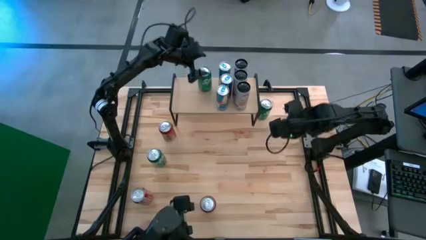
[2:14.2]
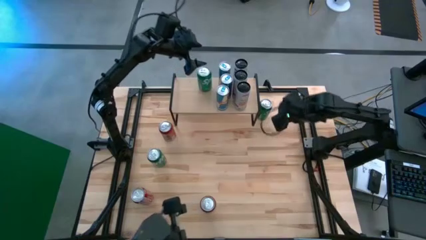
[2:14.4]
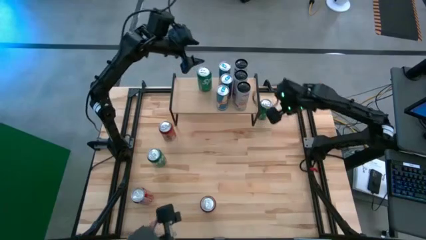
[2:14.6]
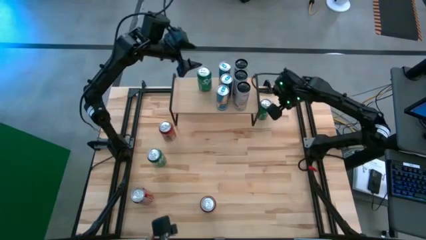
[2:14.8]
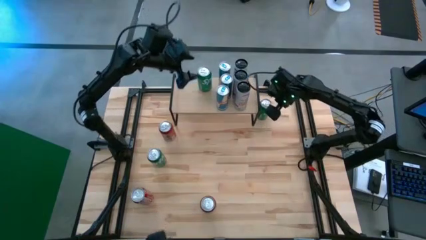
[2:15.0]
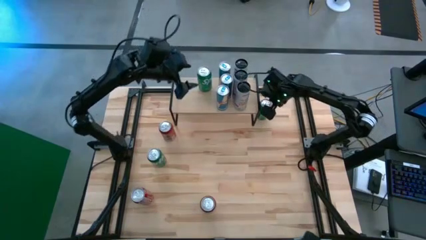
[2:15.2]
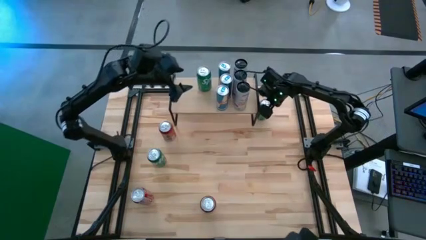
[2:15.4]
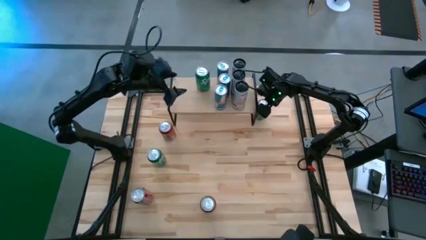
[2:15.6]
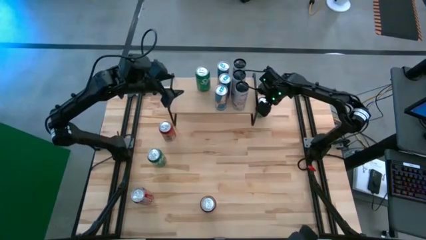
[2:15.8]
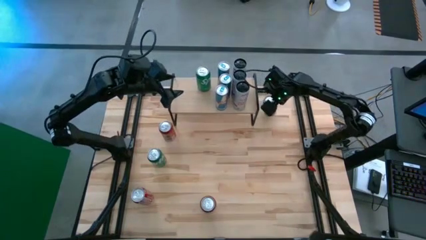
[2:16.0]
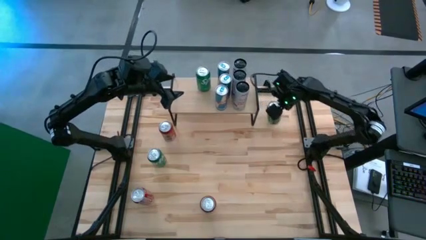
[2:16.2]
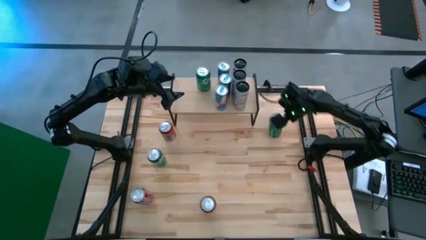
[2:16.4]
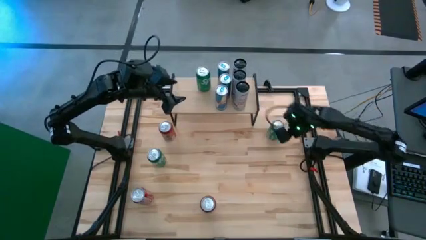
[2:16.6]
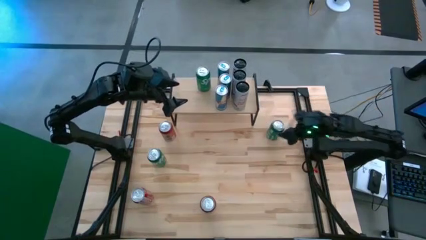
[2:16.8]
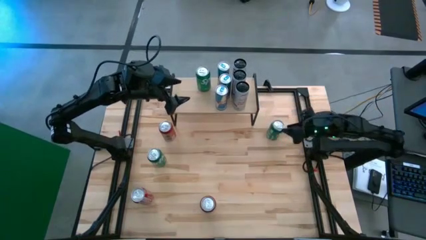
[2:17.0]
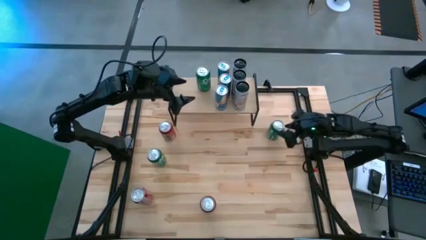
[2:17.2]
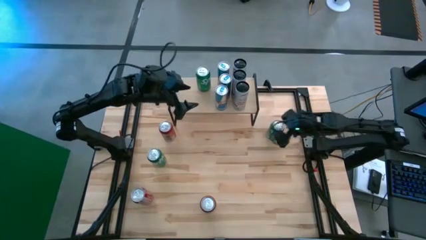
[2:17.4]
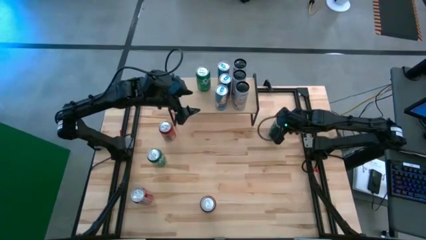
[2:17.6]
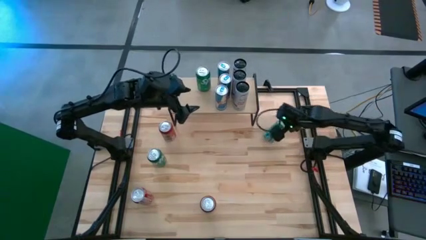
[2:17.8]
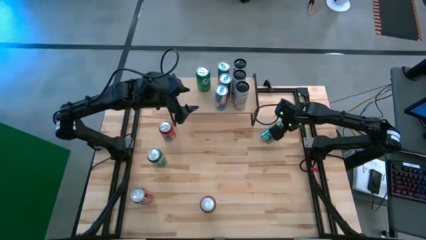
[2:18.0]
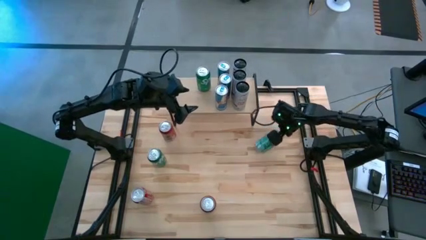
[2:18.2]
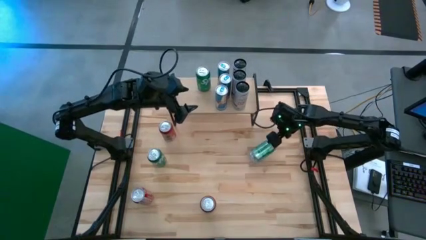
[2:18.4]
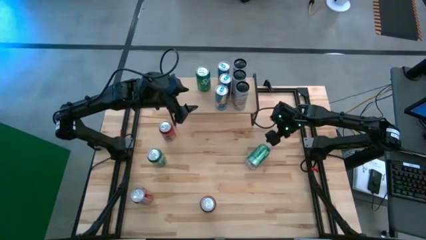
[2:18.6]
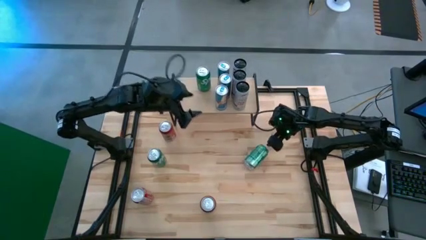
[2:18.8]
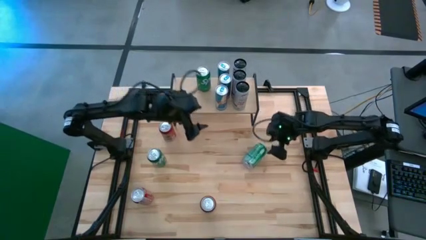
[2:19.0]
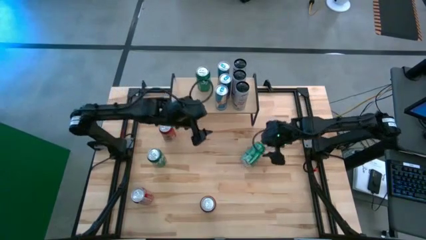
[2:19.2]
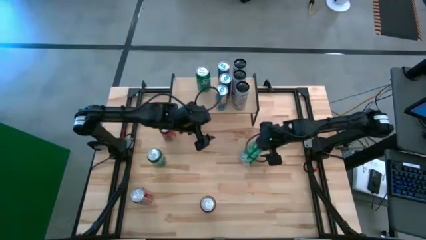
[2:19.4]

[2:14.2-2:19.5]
Task: Place canned beverage on shelf
Put the right green soda can on the shelf aligned with the other green soda can

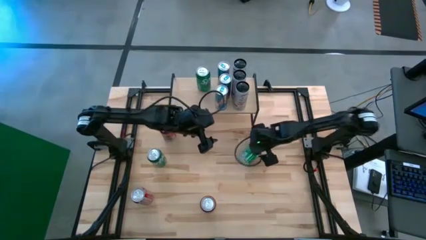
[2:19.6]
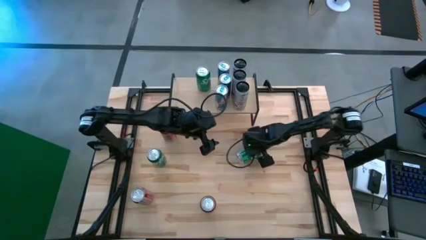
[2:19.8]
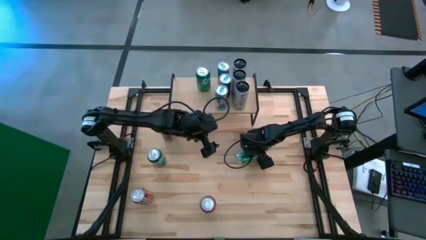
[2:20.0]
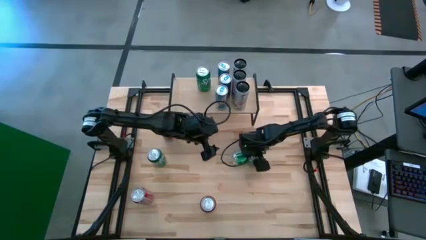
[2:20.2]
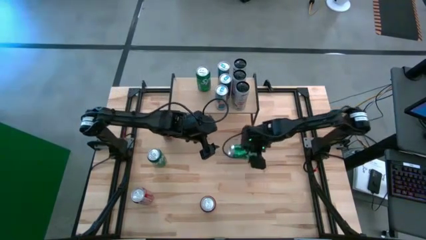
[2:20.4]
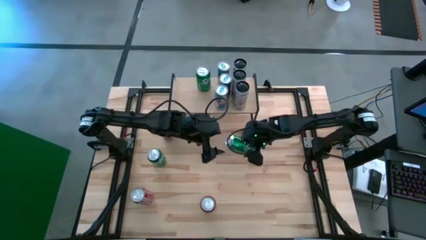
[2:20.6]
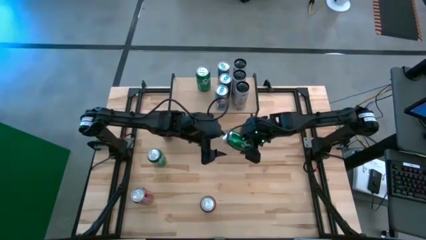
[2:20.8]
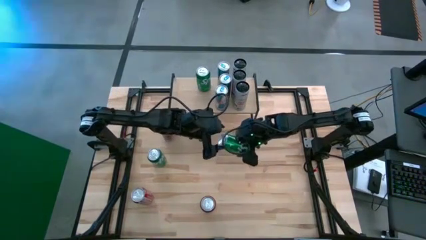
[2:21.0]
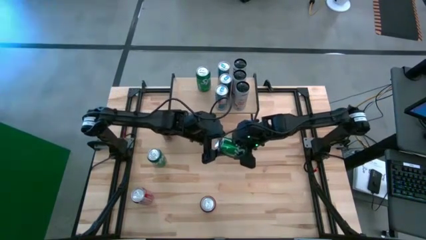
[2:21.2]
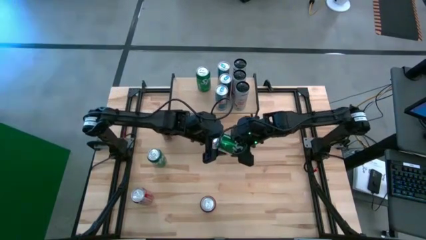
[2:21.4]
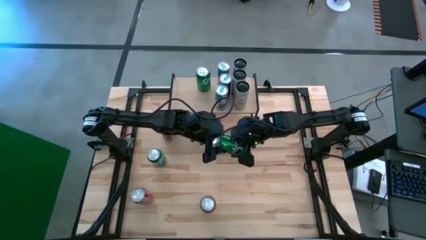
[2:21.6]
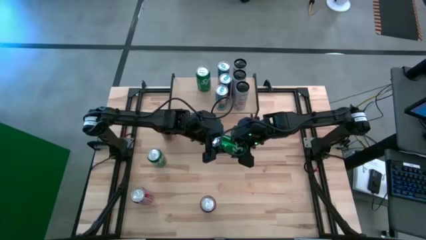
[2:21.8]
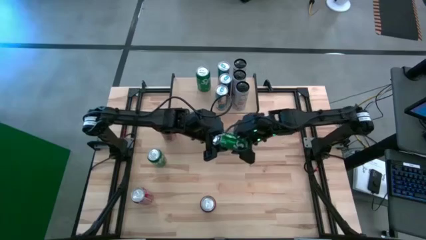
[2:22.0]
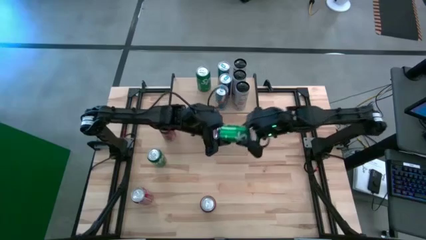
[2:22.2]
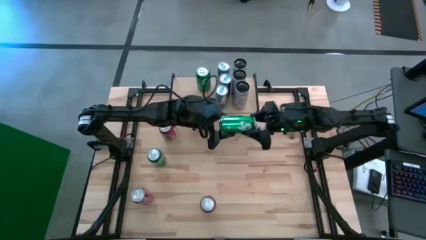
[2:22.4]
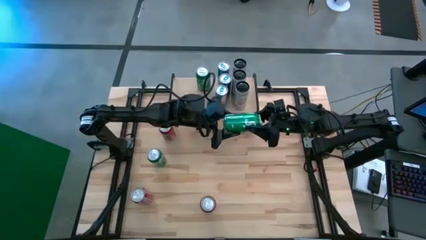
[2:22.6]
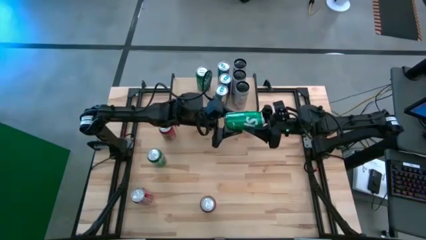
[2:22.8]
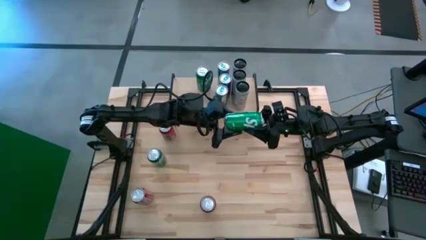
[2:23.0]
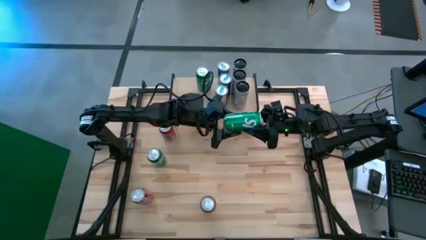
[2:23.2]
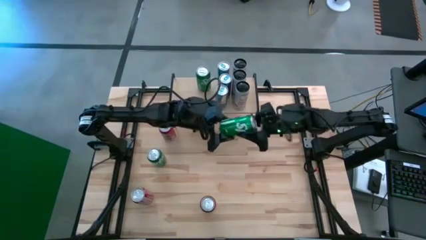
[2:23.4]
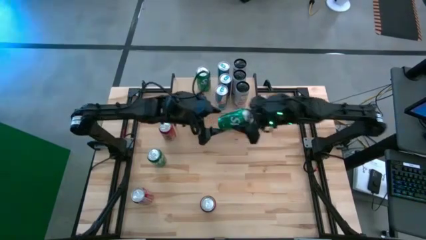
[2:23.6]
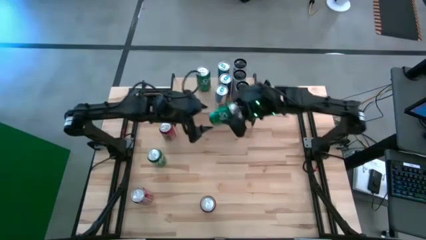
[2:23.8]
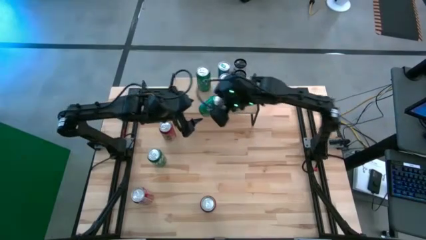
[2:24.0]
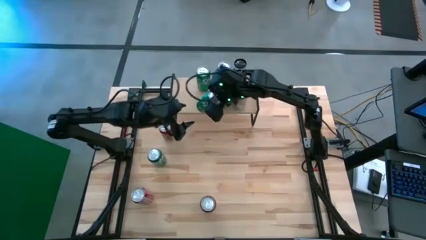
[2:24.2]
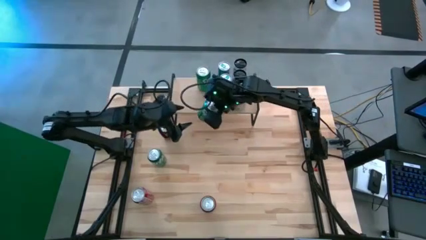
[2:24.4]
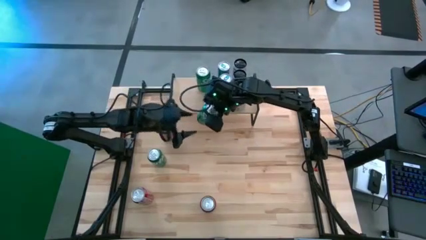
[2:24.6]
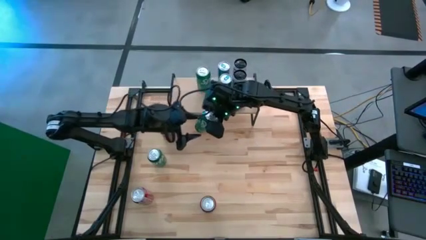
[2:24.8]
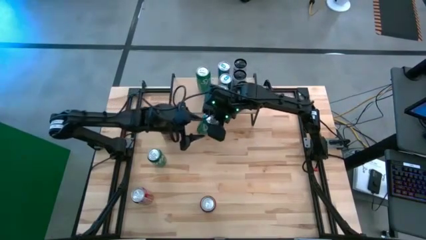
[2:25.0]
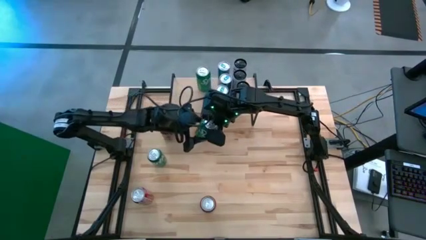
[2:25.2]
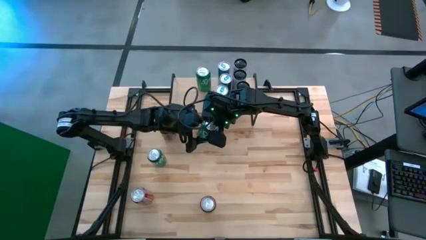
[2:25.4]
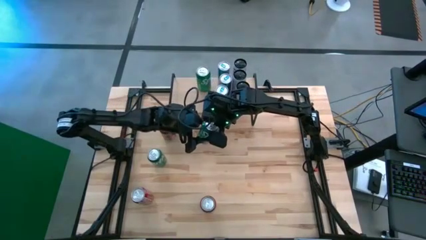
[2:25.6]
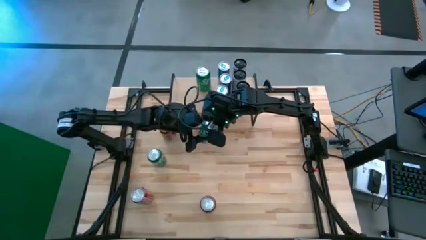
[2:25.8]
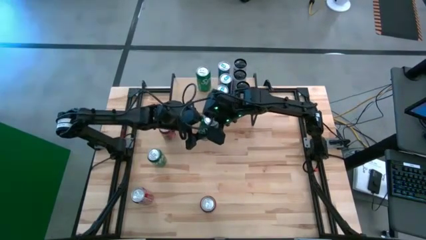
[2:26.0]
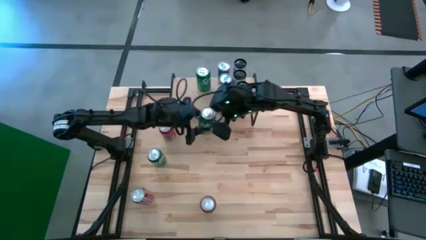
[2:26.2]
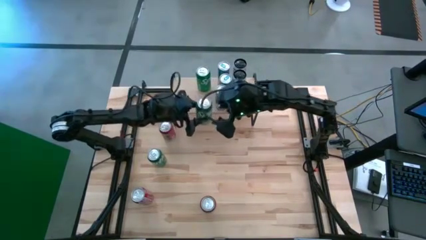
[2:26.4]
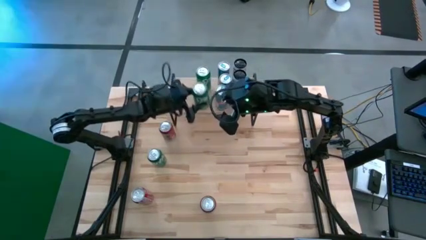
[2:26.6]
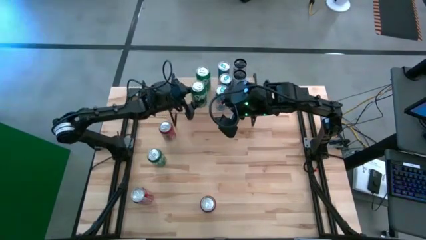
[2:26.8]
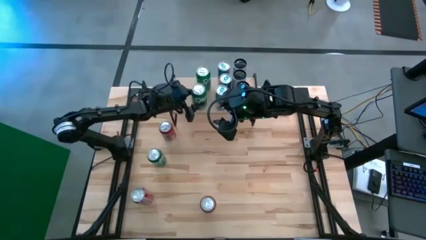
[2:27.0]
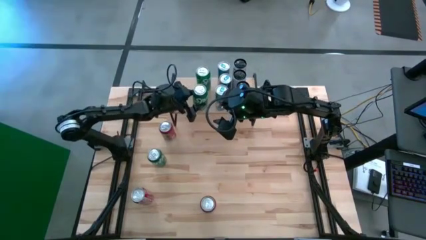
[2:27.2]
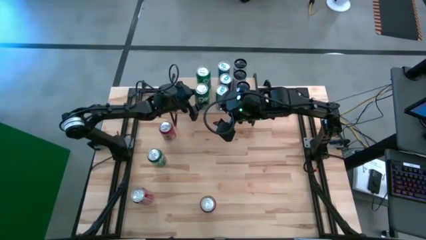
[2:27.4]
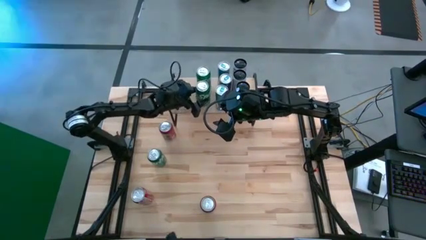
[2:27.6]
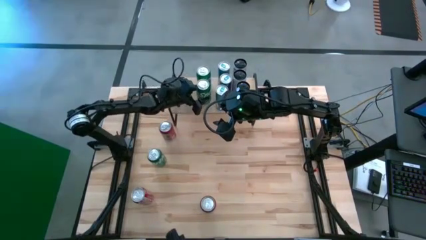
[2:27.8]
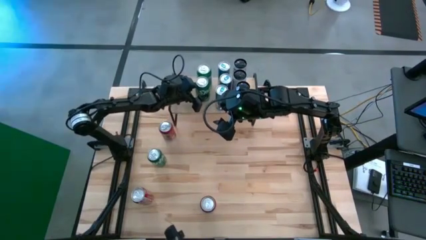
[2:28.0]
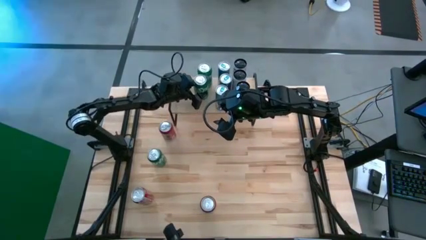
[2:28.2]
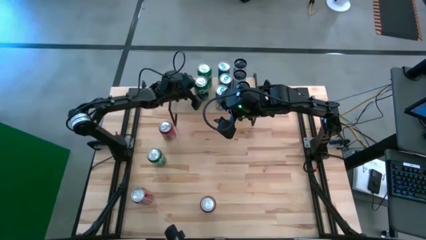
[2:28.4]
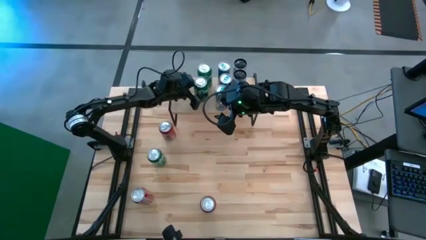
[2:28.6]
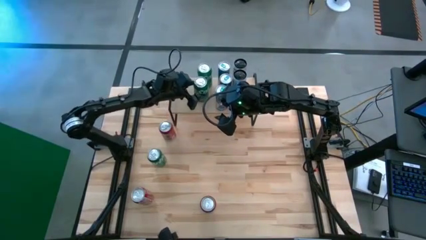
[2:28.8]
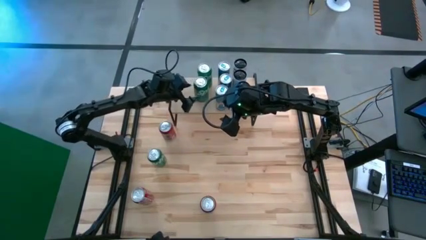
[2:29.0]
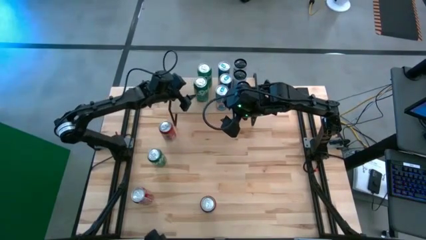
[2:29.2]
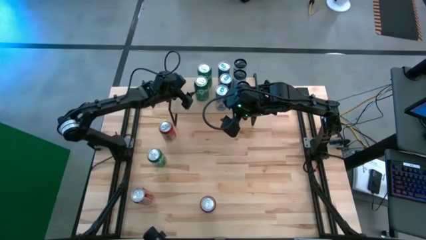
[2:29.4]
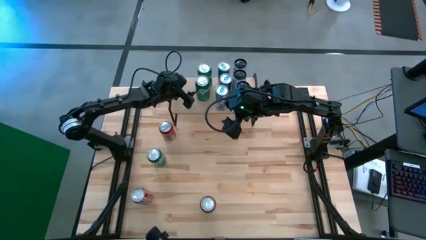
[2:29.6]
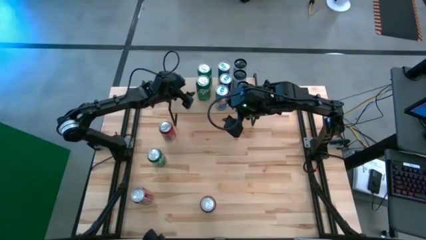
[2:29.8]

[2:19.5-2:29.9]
Put the right green soda can on the shelf aligned with the other green soda can
